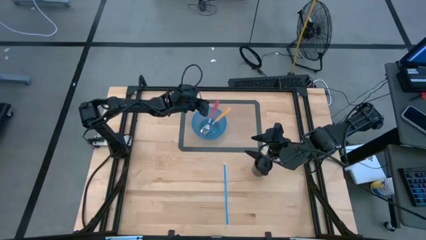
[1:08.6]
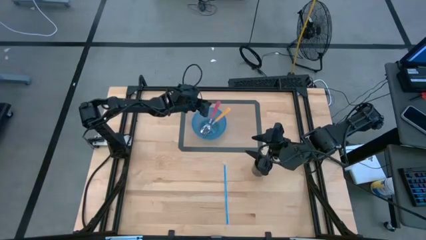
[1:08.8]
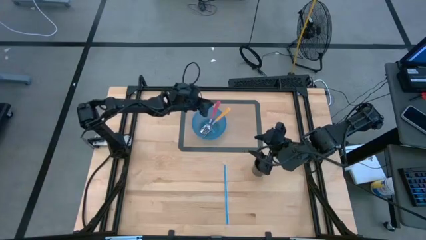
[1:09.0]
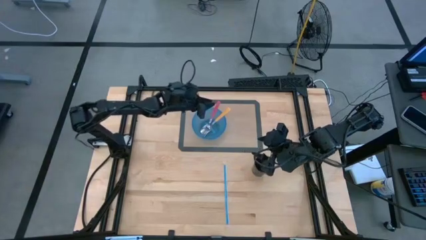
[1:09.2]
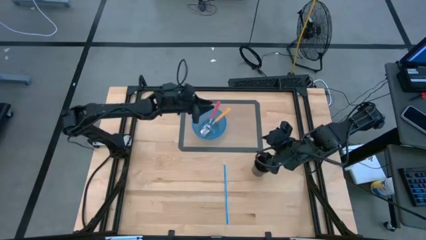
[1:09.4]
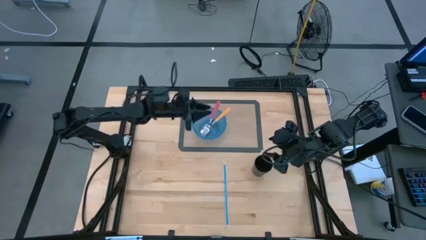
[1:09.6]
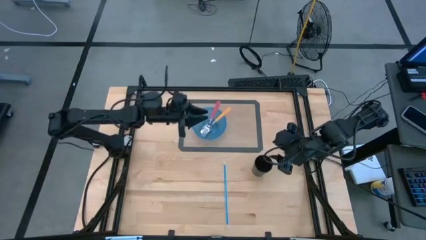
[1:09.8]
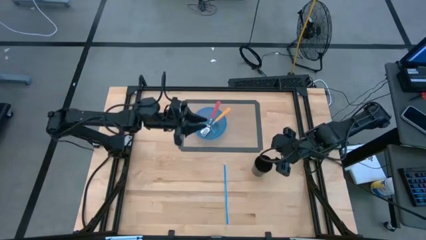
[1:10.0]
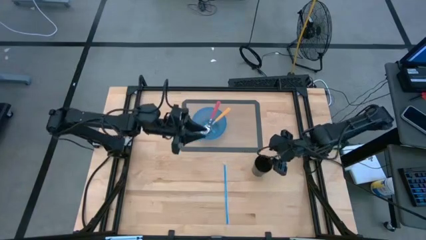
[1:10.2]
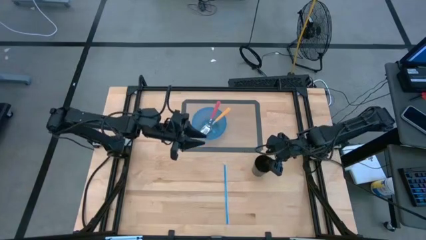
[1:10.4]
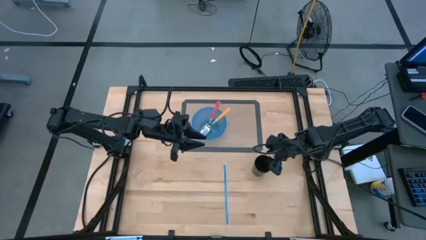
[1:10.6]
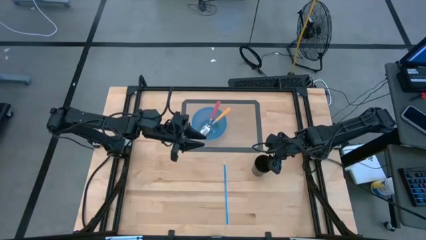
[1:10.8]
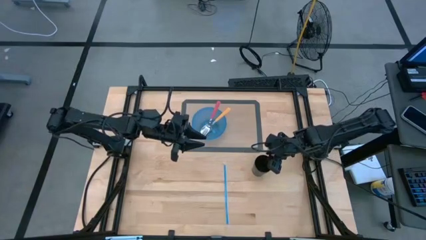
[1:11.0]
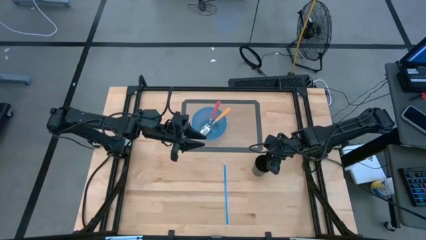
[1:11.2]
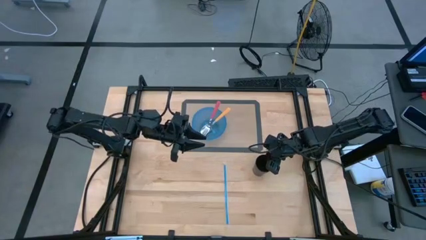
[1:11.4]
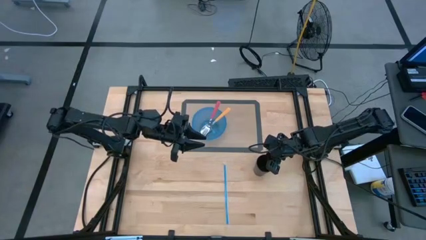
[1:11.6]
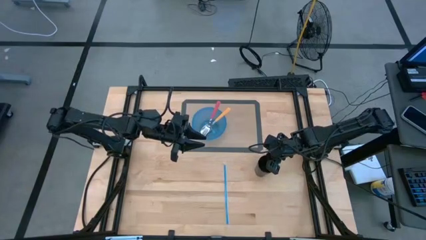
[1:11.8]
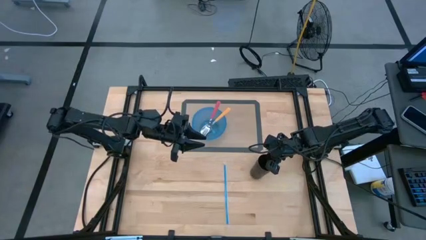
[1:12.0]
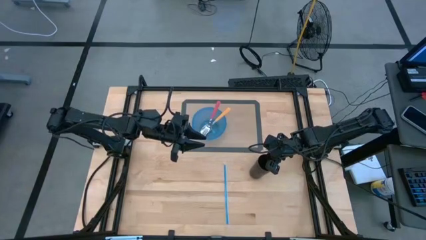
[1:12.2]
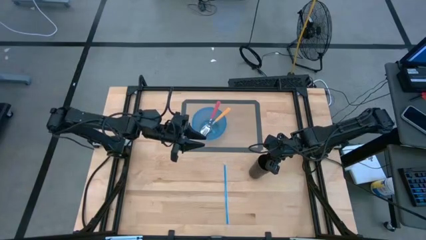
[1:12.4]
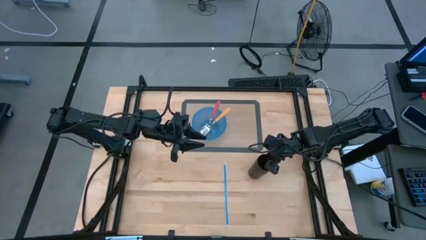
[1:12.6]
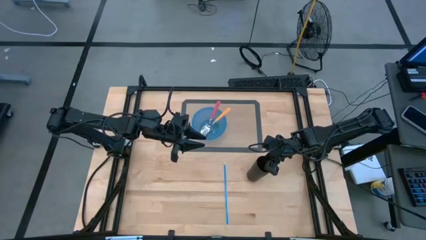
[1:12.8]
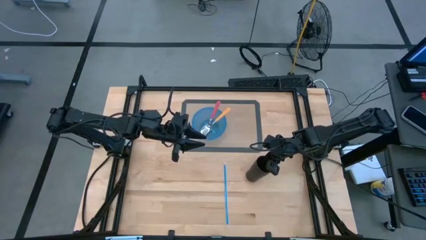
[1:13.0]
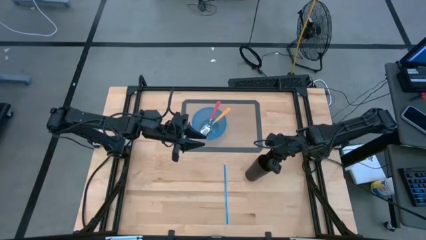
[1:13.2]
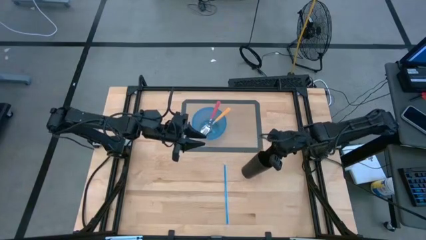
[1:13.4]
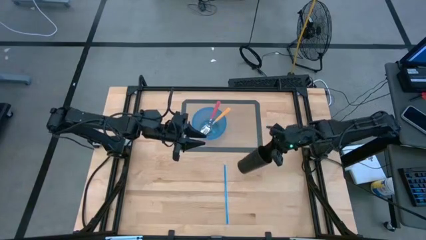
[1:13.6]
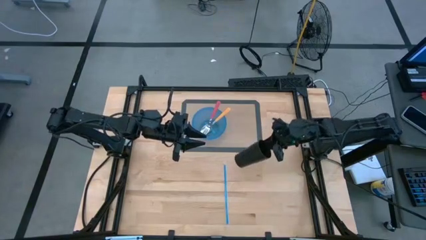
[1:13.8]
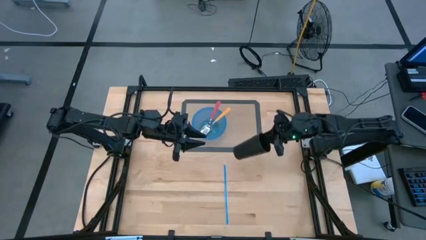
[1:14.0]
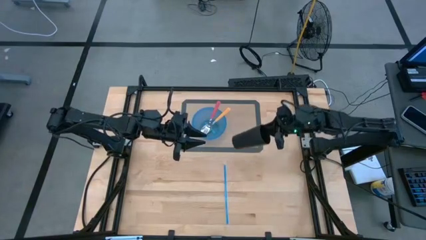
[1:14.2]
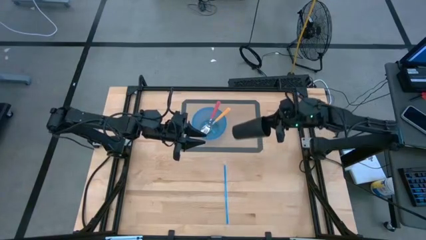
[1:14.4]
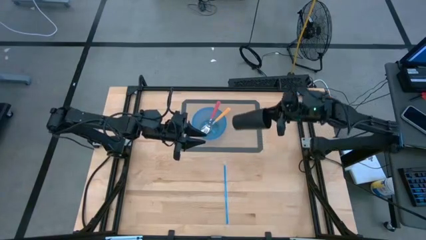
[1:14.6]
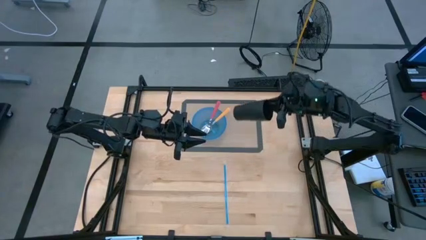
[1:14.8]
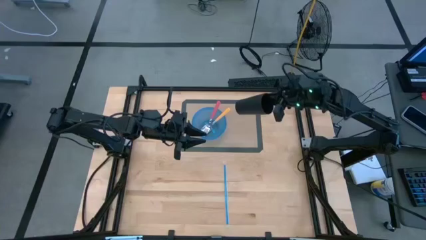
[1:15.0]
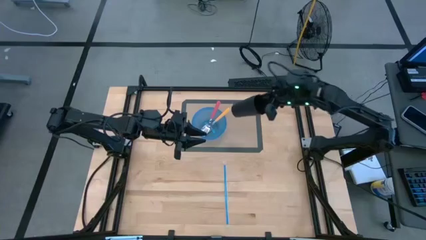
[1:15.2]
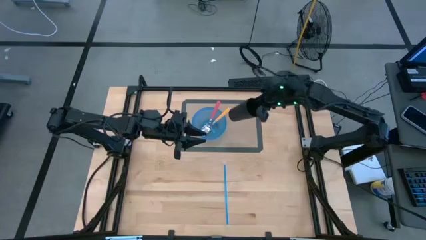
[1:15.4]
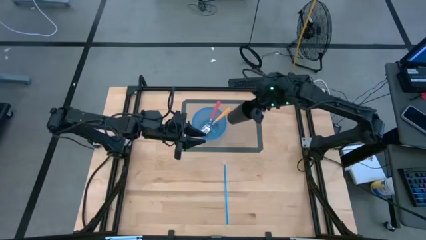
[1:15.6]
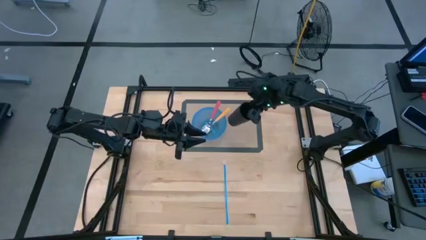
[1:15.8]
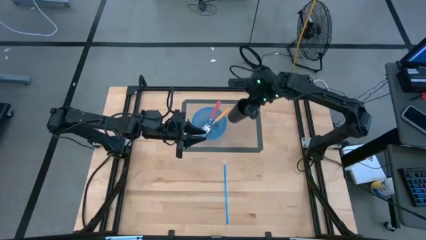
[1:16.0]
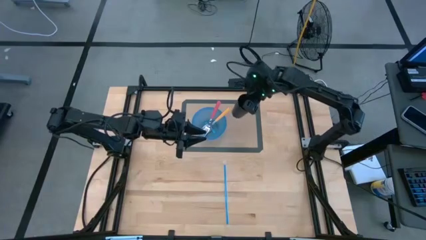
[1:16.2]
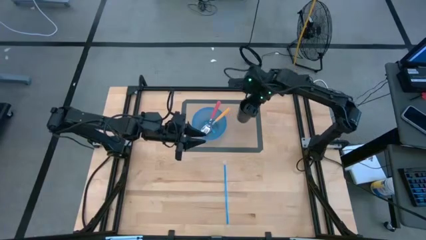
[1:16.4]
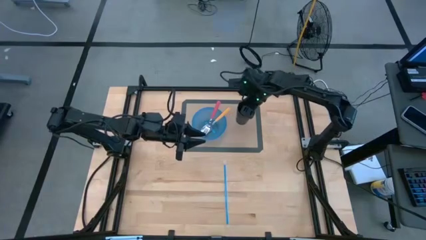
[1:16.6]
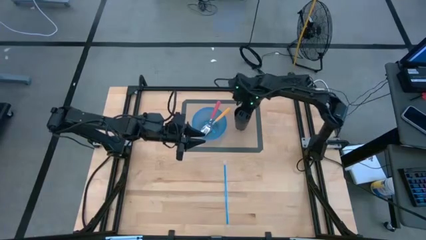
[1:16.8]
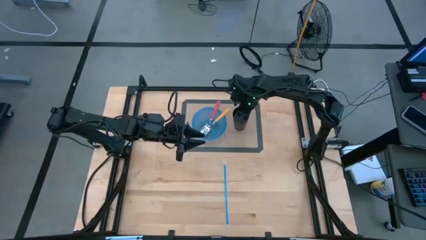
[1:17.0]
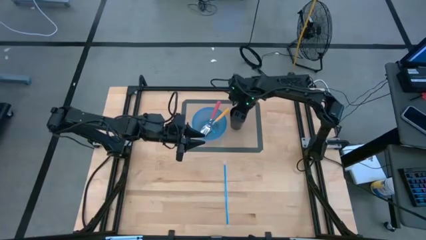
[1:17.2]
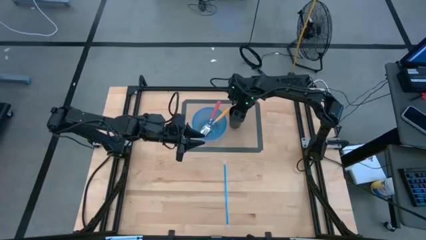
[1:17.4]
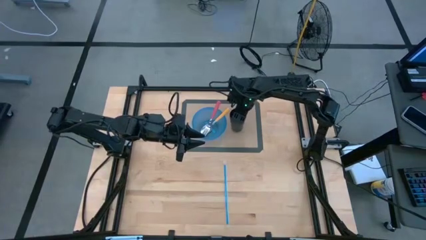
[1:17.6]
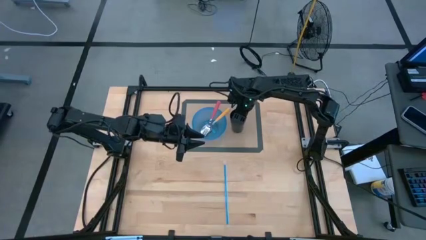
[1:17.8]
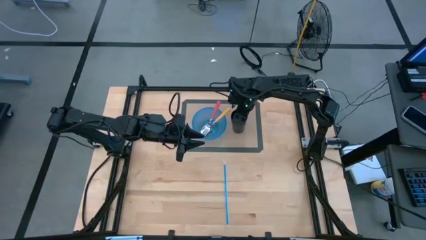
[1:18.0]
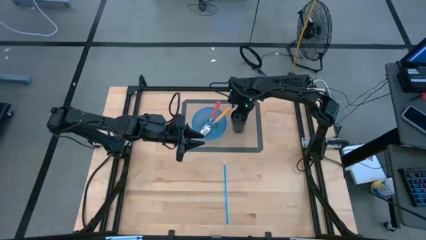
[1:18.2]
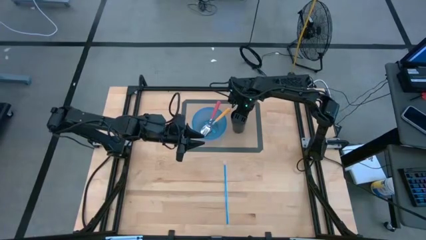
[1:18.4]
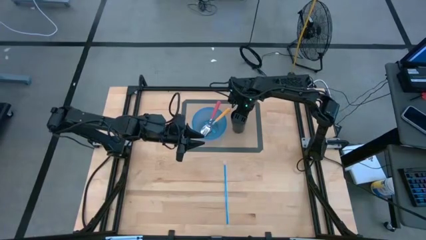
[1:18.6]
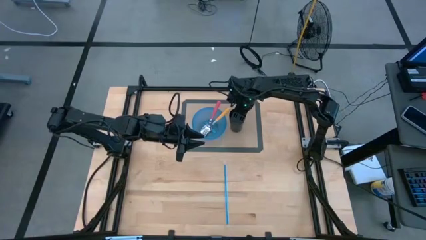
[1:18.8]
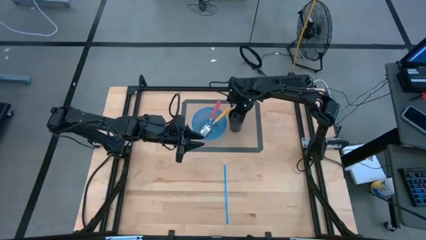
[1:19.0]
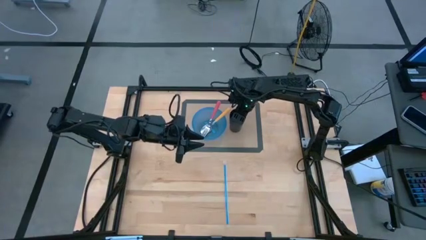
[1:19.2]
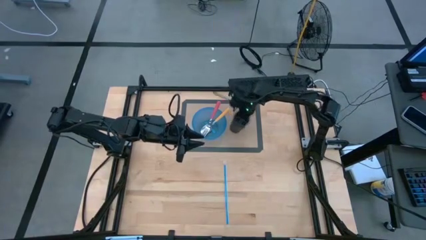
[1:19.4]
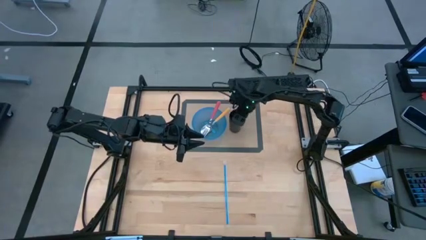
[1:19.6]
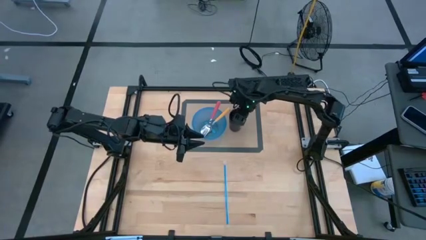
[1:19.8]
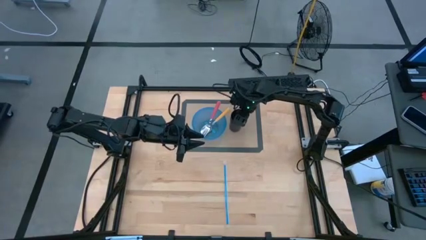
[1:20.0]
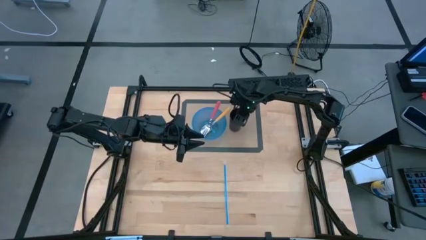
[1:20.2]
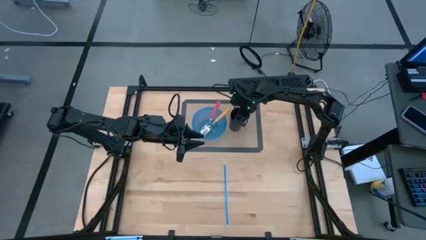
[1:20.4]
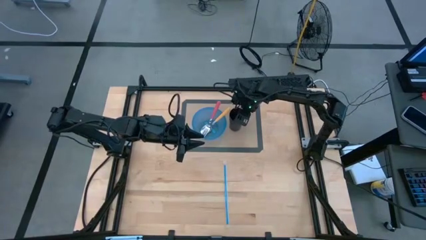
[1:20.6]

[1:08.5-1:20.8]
Task: Pick & Place Utensil
Put the black cup on the right side of the blue bowl
